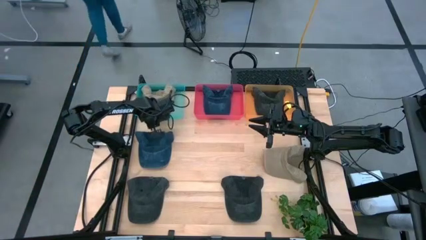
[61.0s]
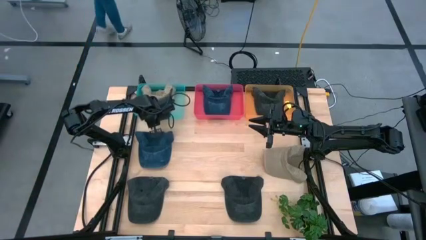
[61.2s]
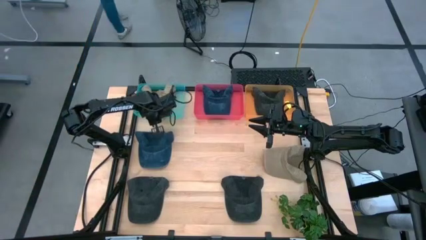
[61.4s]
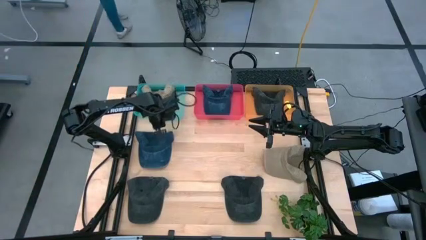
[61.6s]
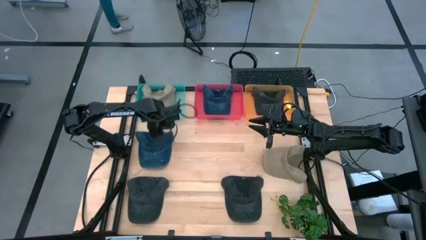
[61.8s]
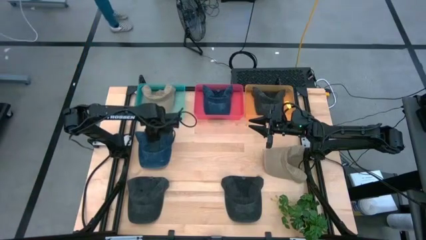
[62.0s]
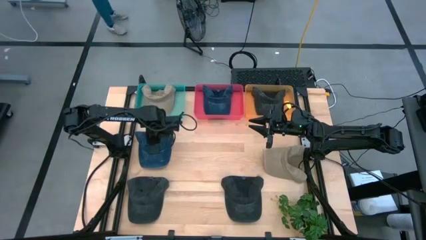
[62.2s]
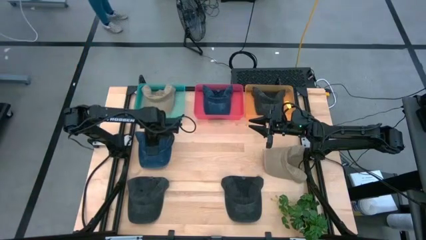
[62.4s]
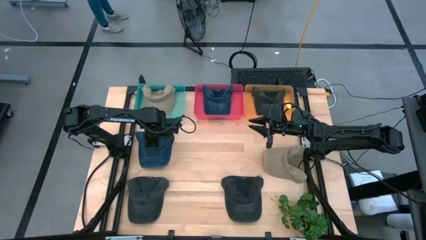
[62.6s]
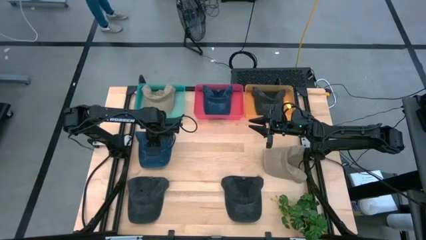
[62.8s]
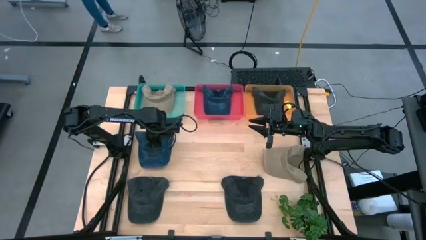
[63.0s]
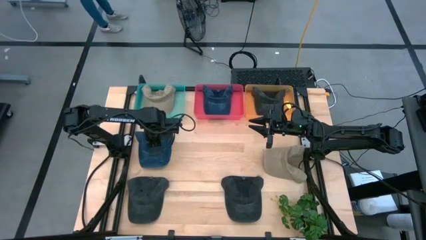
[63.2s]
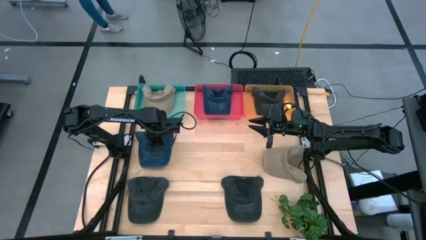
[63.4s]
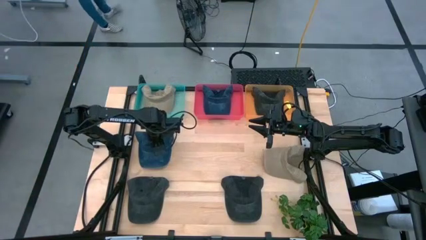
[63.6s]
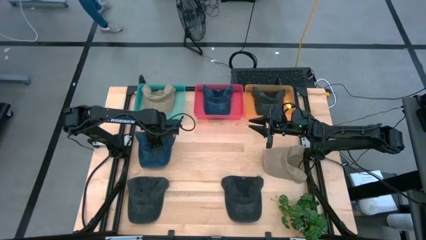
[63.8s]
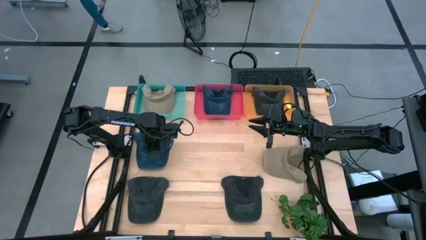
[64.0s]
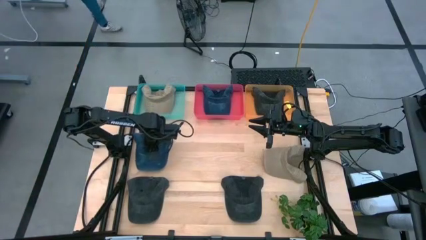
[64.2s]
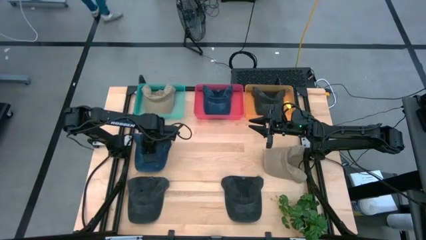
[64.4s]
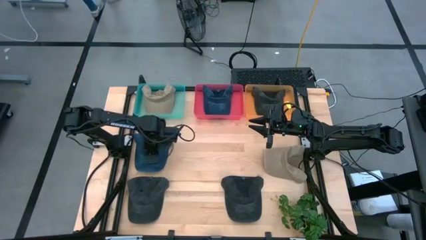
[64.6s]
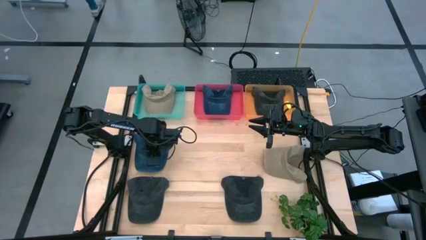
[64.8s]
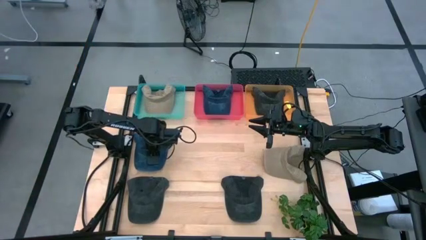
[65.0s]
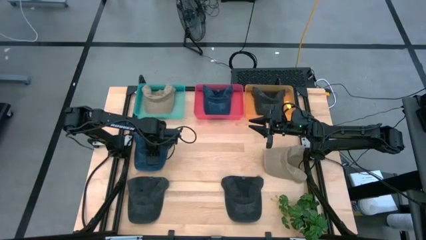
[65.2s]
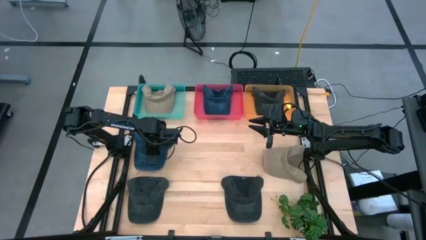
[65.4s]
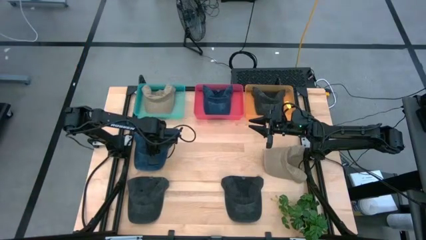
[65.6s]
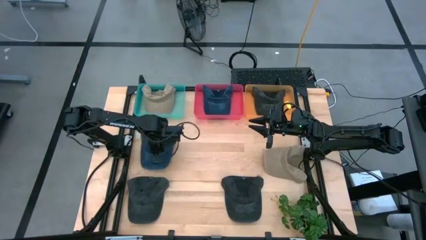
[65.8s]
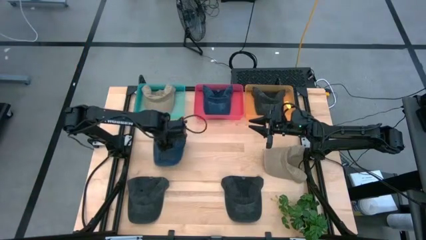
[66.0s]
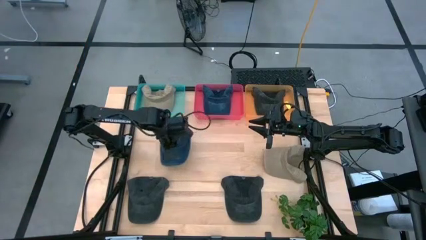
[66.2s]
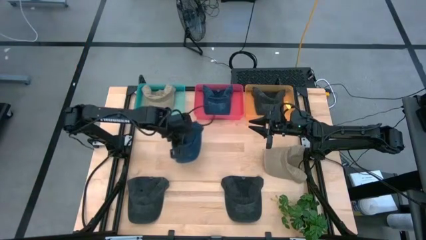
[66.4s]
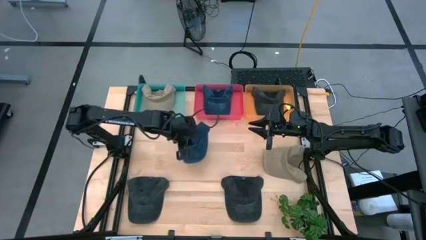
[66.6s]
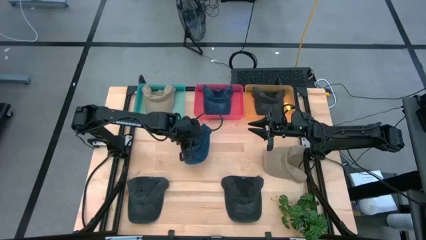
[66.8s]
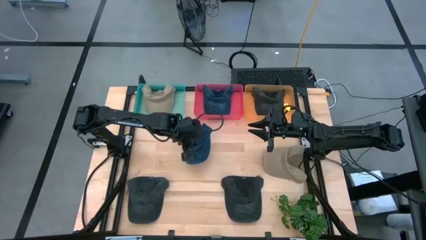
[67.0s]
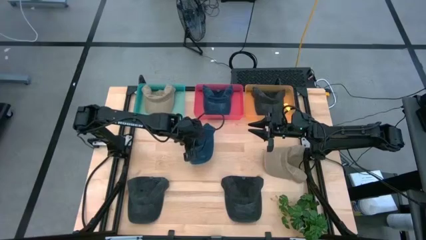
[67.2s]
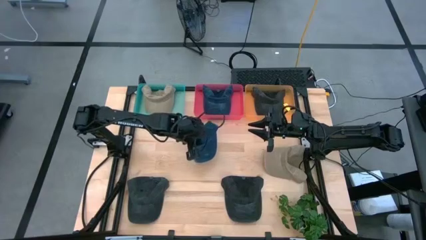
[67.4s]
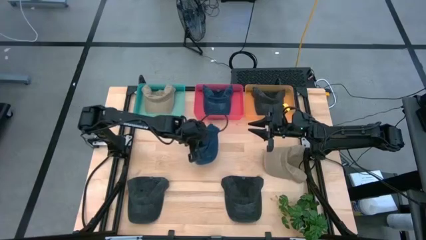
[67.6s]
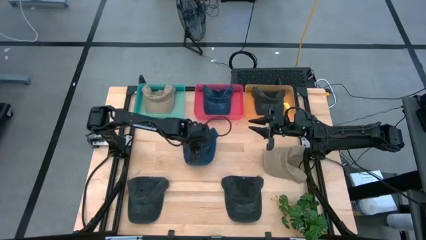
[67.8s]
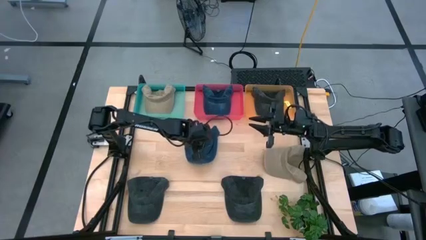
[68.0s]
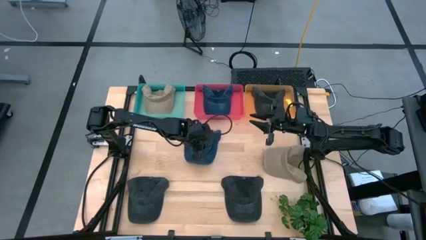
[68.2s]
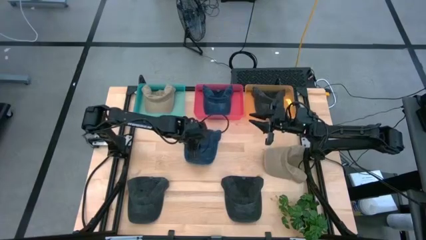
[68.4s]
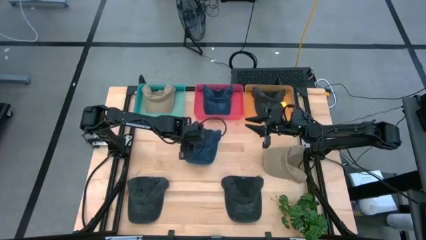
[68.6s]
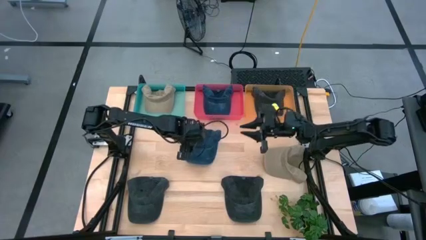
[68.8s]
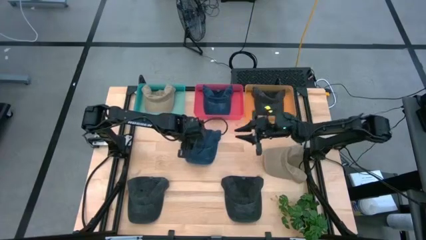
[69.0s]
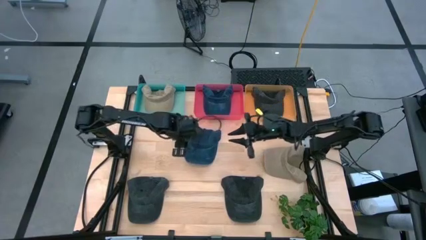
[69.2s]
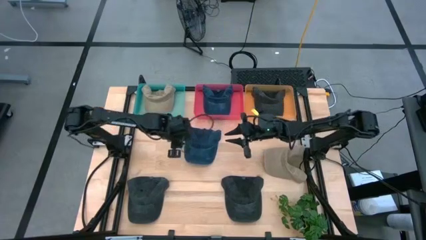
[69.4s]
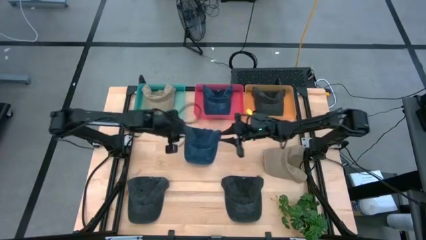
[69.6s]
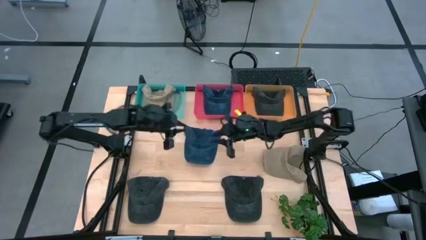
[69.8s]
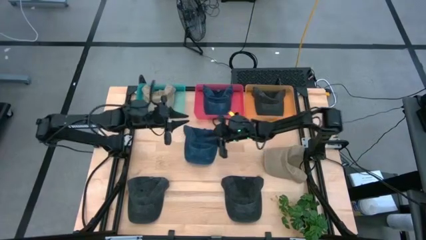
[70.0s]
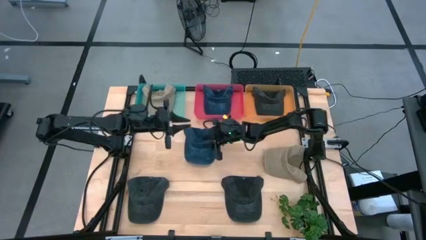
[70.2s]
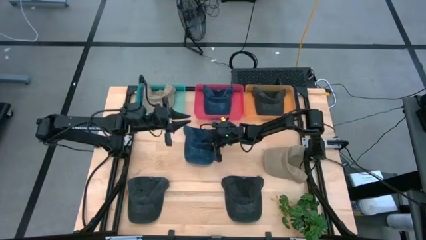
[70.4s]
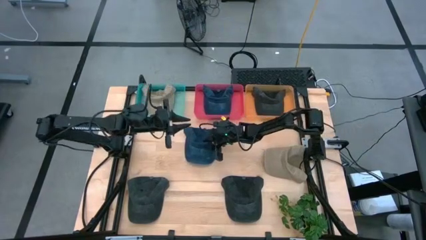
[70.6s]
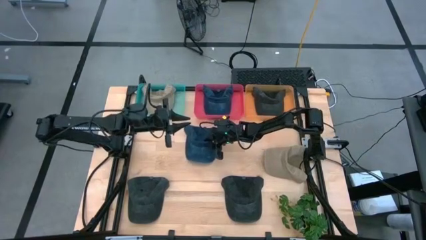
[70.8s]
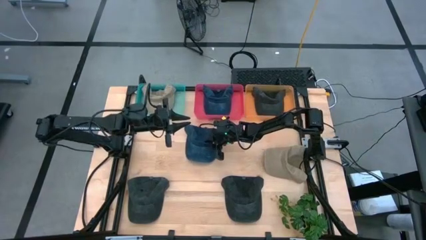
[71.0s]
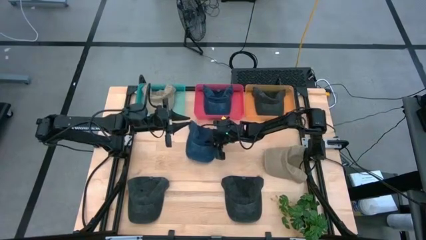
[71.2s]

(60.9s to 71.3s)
Task: Pick & Place hat
Put the blue cap into the red bin

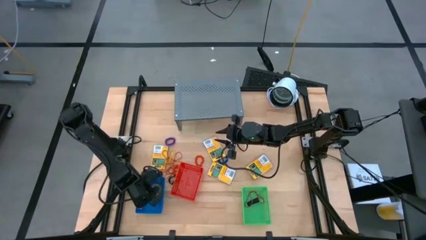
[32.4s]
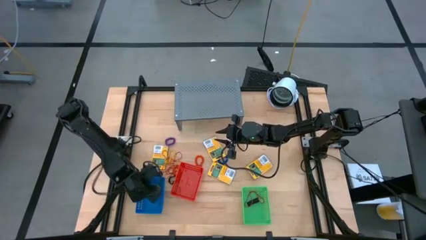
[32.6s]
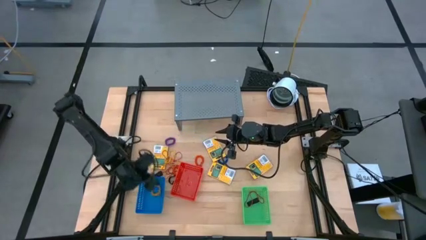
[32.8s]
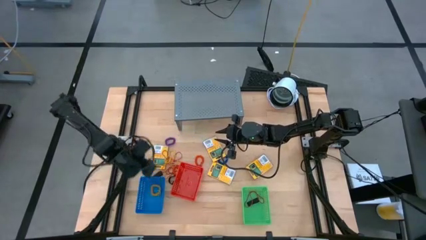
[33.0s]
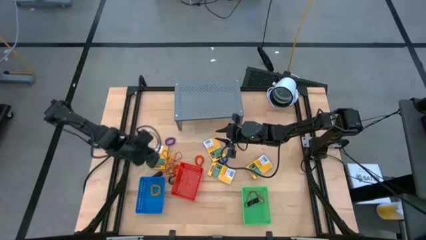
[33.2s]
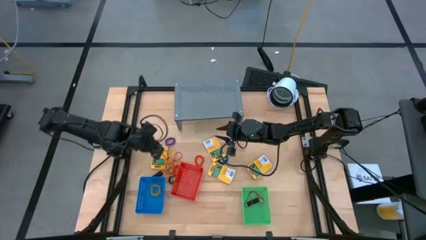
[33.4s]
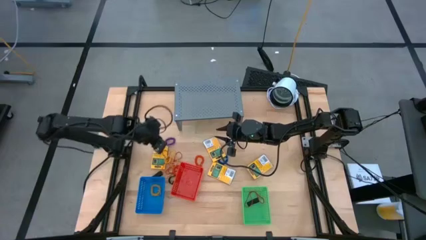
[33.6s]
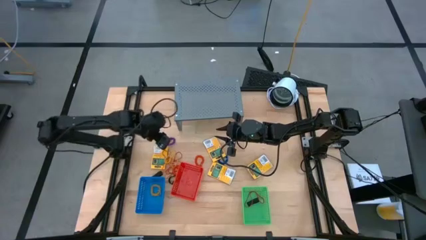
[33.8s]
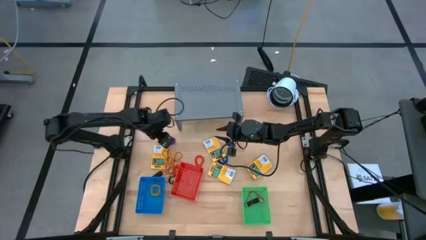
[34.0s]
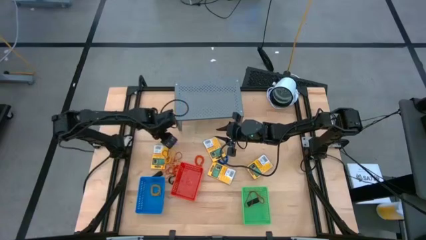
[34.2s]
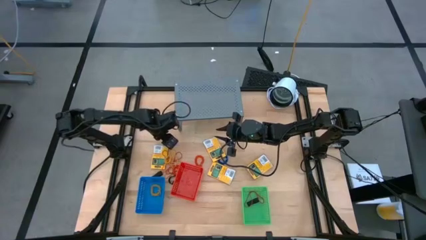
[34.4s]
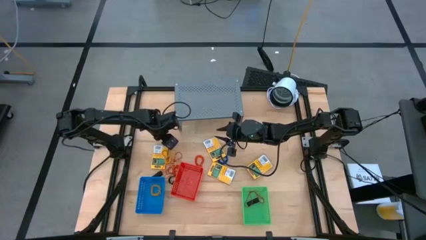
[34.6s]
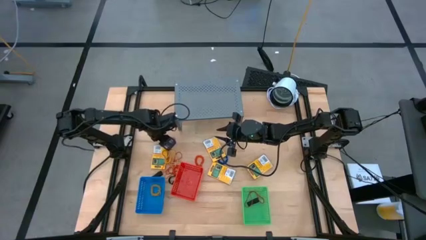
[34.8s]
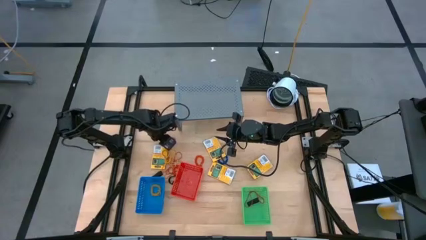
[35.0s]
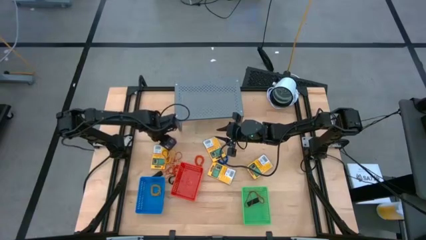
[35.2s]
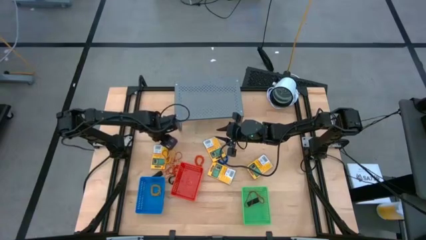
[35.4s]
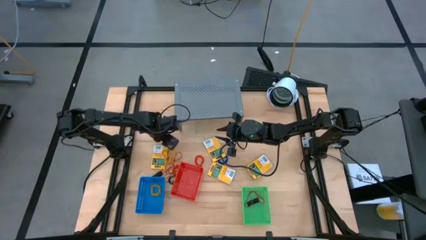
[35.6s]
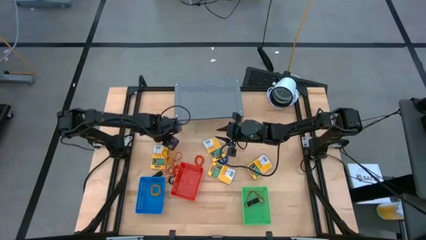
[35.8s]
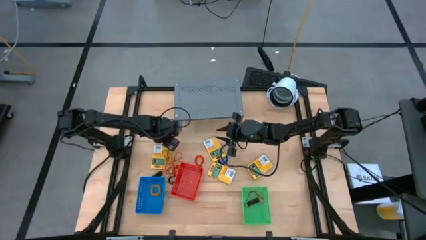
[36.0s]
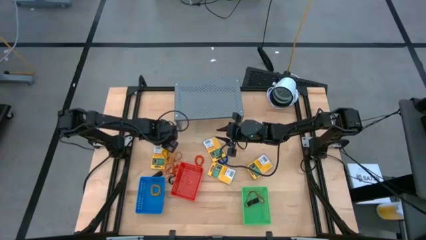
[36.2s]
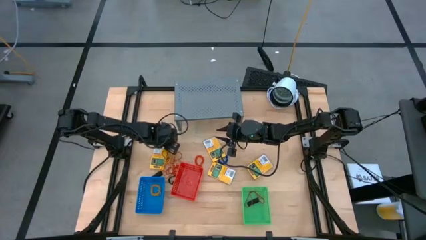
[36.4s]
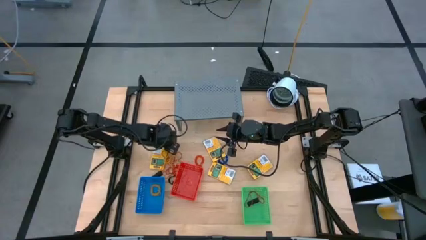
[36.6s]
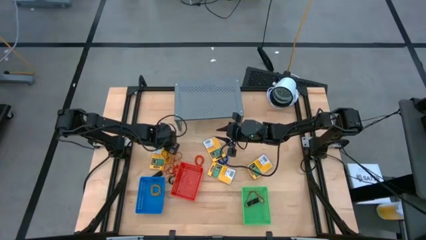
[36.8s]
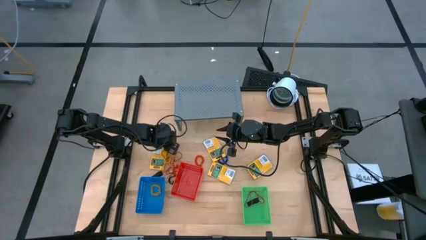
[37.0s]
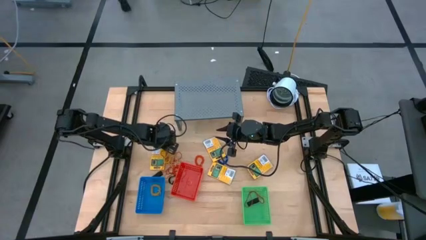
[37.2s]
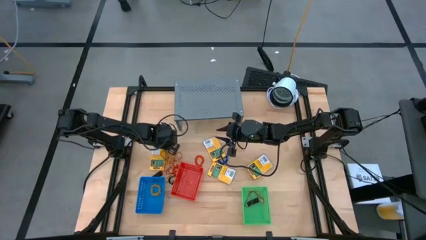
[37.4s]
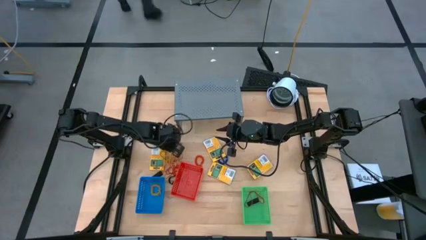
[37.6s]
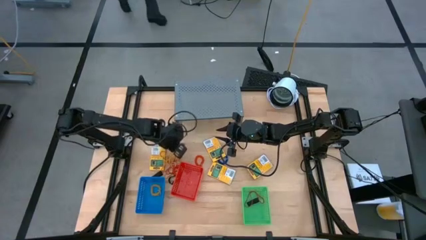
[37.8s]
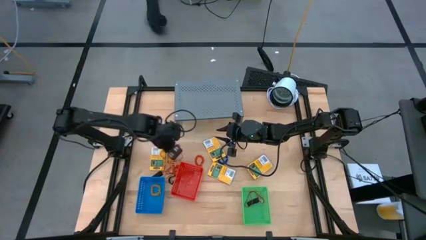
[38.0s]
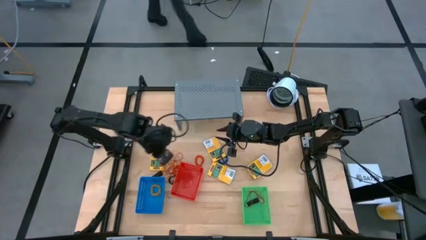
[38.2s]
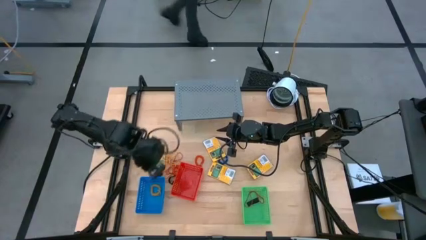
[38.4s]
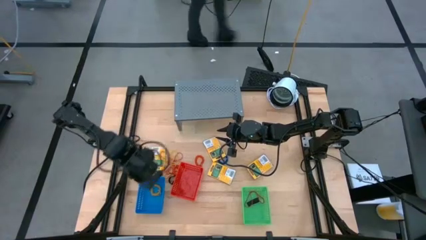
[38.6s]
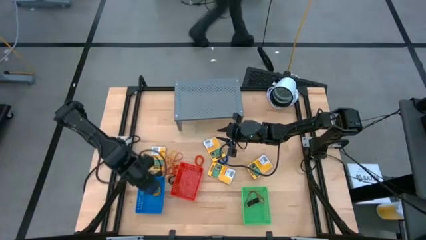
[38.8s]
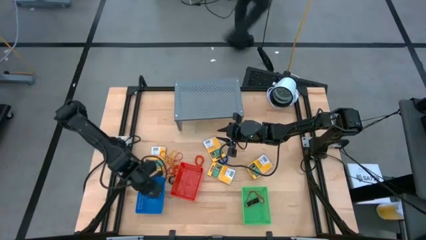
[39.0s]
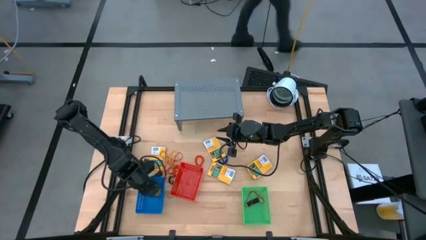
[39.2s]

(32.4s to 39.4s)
Task: Pick & Place Office Desk Supplies
Put the violet spring keychain into the blue basket
